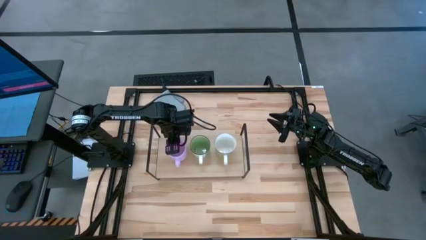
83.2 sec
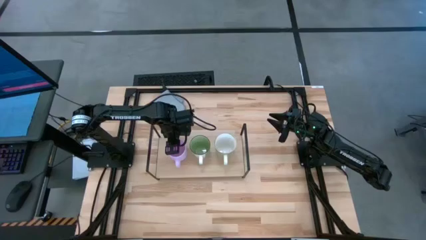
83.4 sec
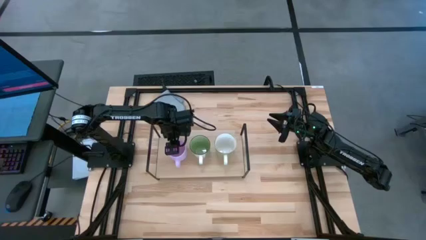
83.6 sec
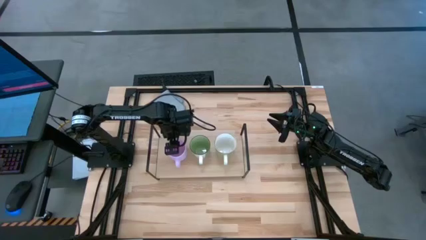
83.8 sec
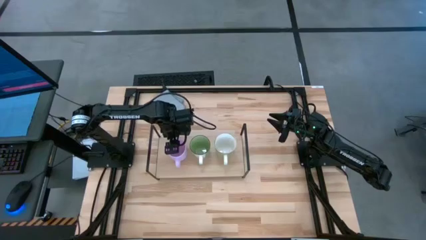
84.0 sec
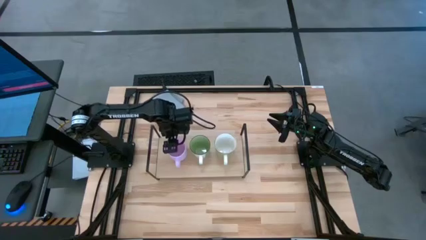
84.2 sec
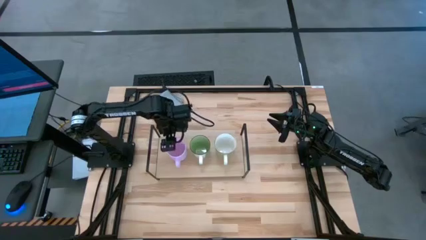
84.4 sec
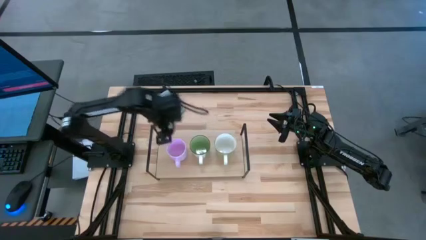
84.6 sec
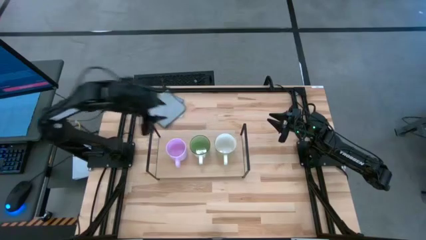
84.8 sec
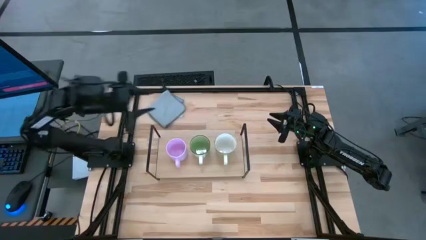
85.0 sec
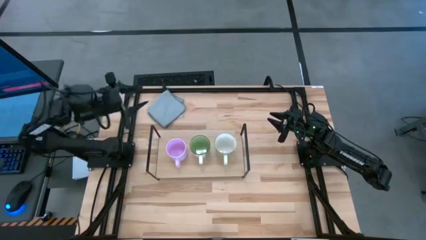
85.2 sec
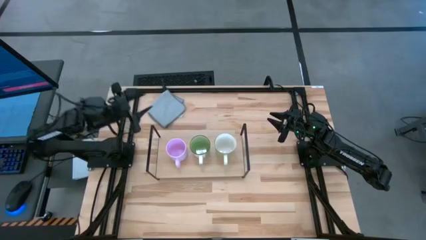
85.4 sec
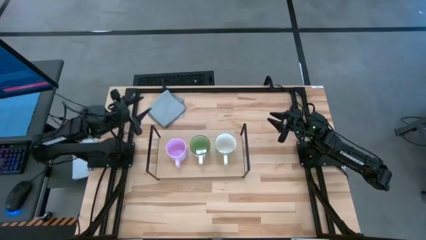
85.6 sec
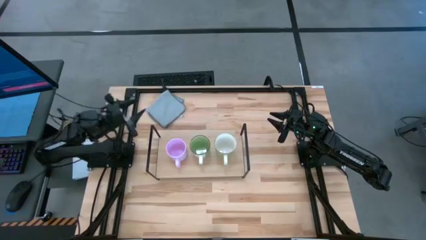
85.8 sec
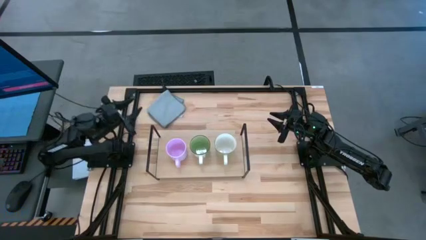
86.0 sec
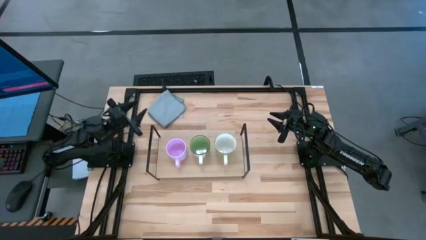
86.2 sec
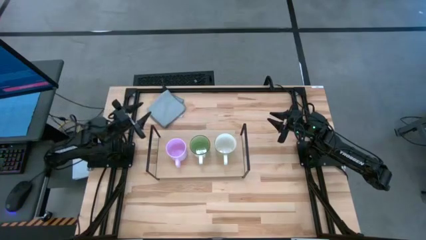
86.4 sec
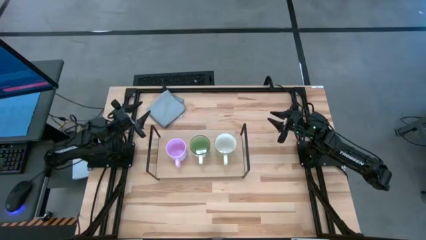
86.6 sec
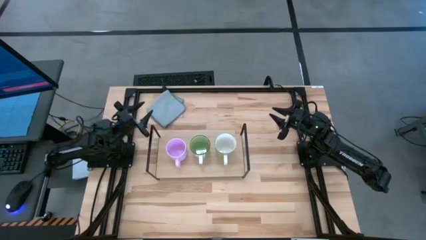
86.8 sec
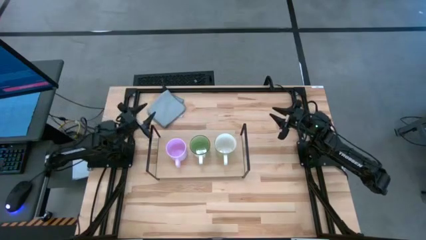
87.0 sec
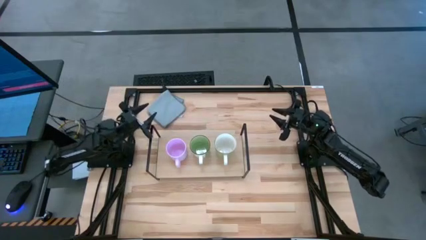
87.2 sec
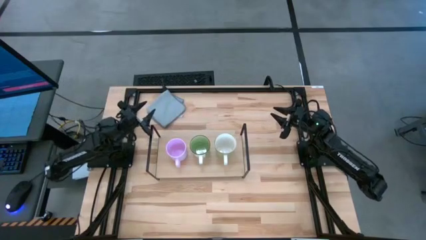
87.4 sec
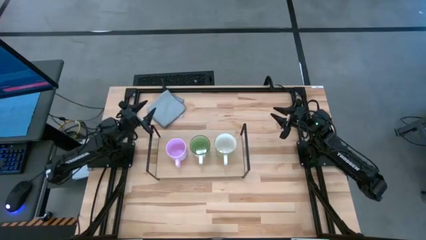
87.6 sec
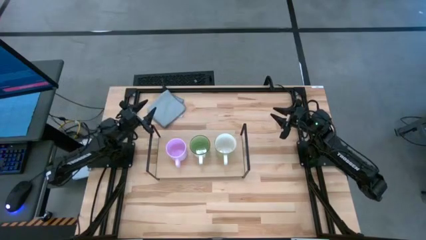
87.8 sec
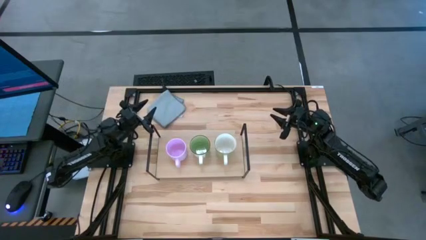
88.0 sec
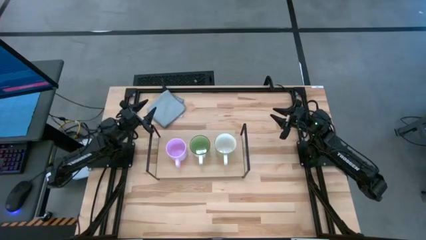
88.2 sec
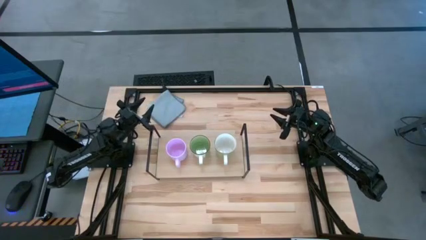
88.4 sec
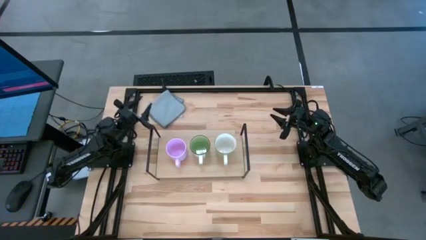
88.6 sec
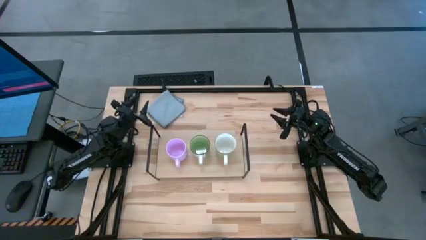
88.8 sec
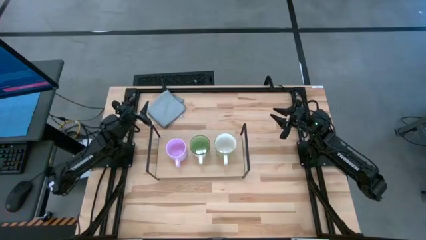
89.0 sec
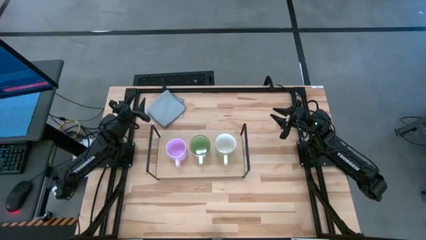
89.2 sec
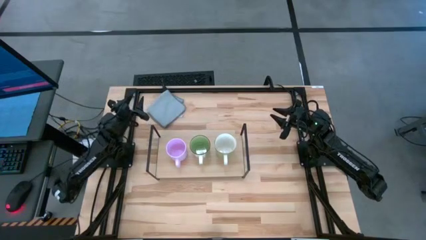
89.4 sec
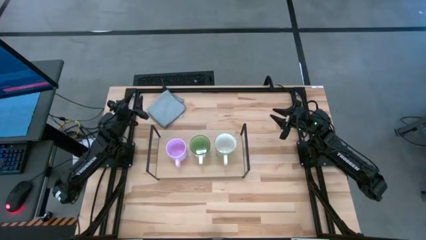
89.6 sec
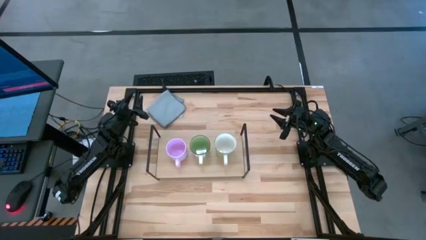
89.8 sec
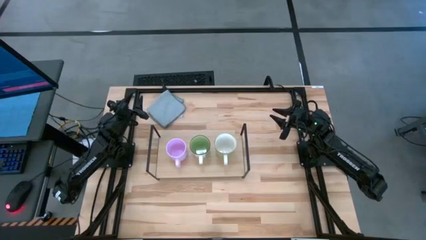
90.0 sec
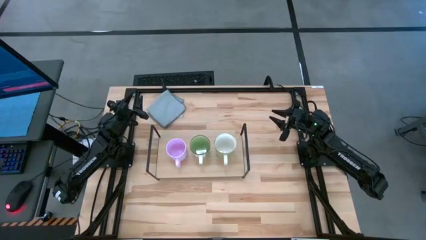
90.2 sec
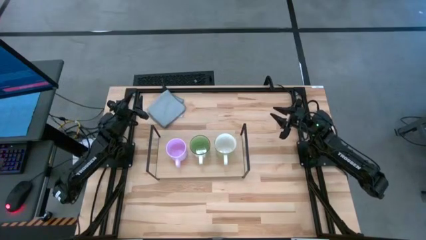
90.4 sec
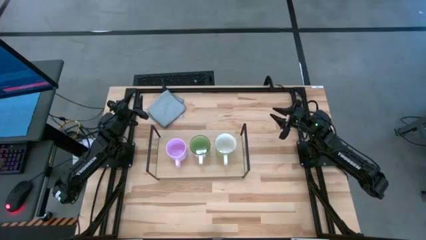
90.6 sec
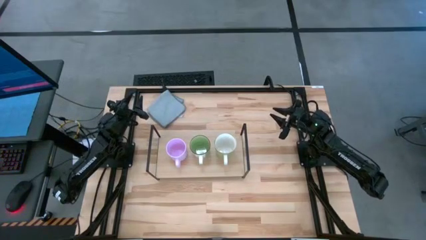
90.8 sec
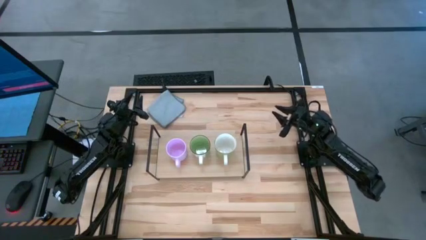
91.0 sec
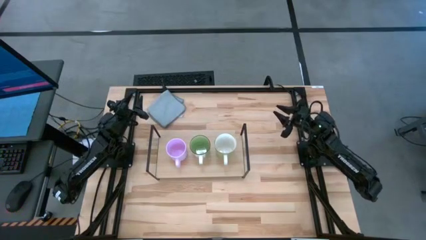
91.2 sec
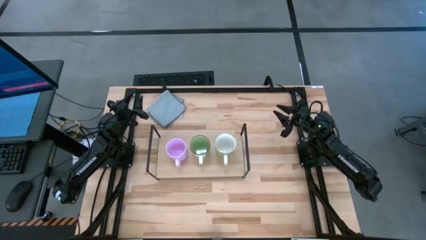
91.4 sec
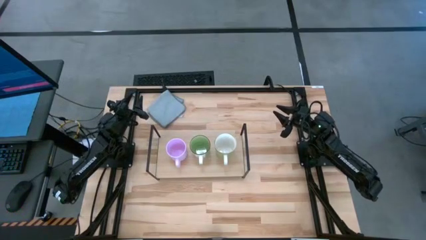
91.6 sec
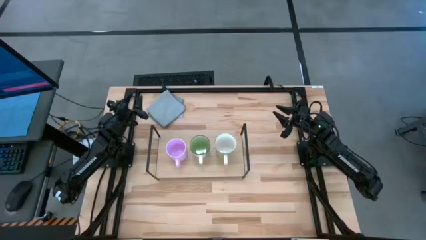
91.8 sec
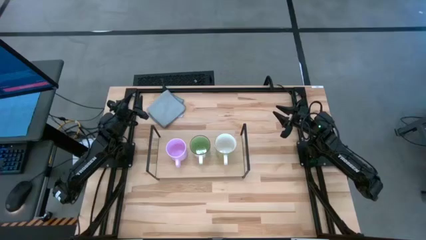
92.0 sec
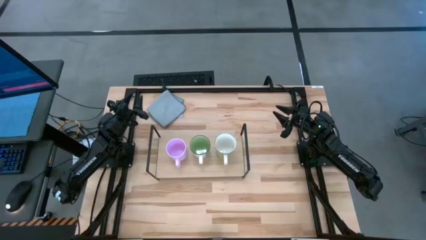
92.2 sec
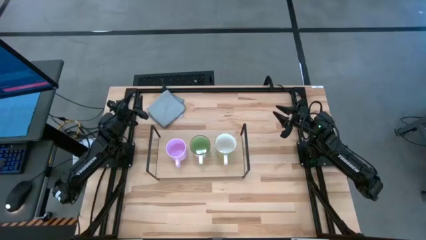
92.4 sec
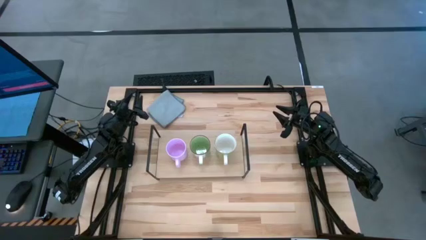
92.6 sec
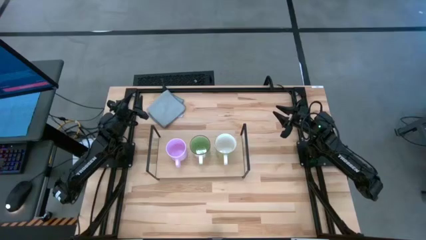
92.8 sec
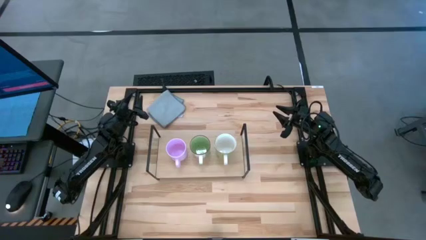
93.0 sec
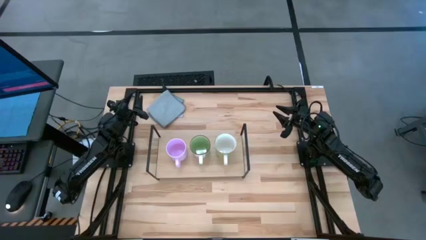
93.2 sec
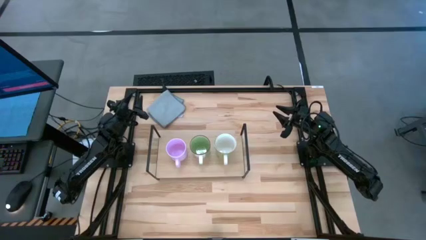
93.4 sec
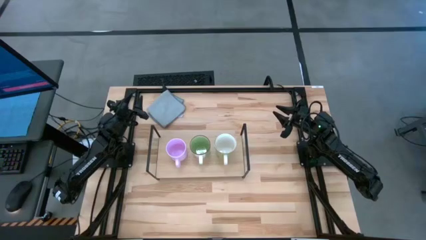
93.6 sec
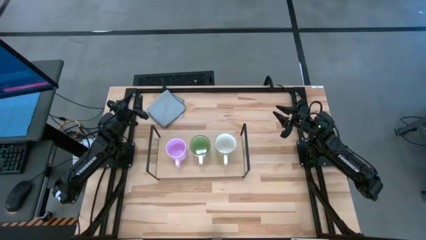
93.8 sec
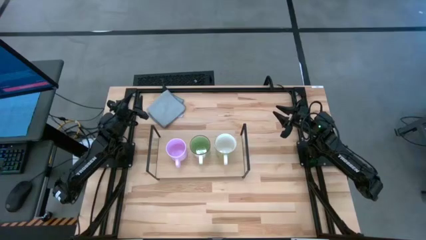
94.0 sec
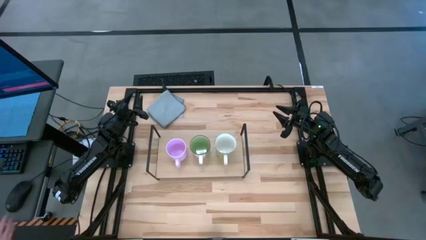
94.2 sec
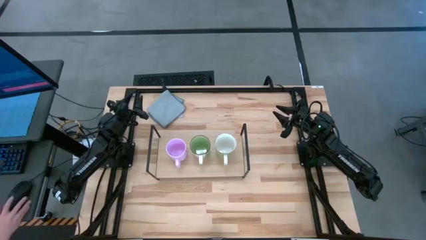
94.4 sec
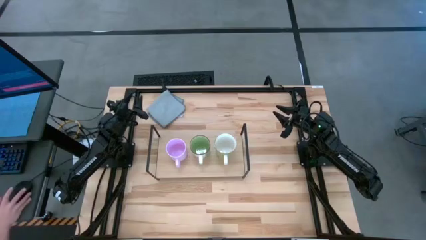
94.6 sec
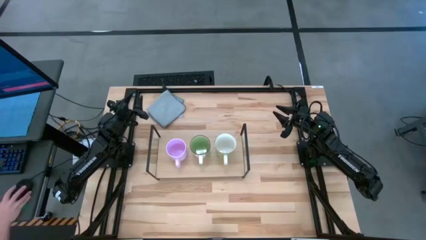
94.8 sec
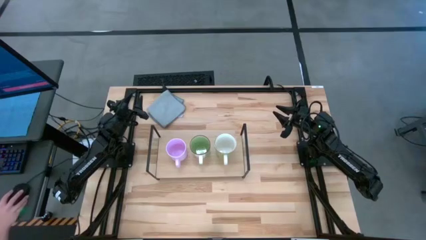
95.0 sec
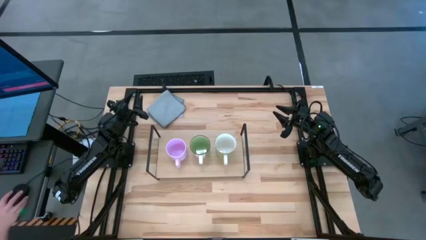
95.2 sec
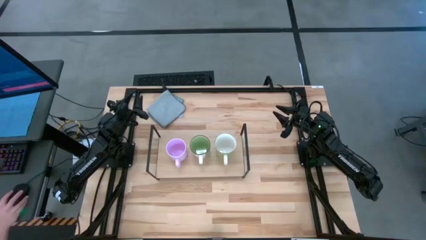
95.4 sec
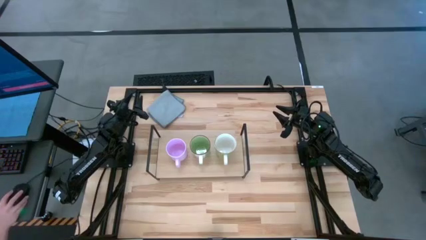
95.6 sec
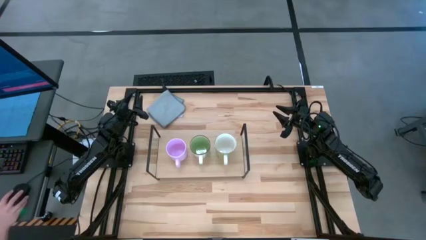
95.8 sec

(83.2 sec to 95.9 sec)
Task: Stack small to large cups/mugs on shelf
Return to Home Position
